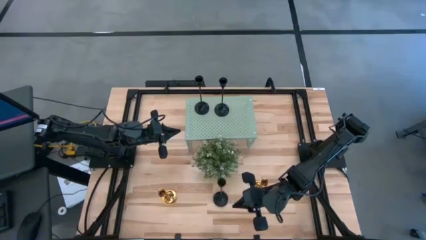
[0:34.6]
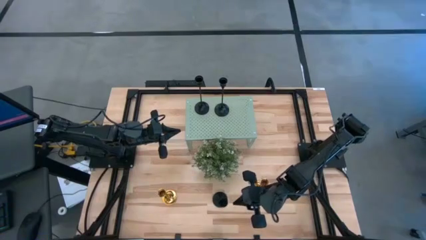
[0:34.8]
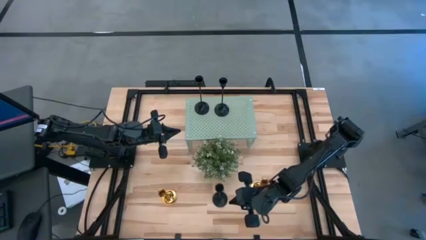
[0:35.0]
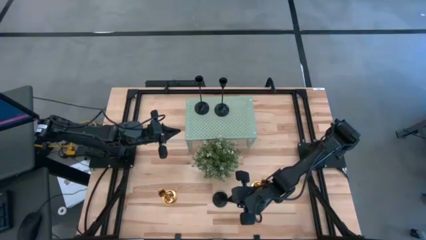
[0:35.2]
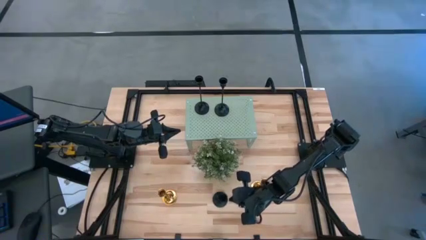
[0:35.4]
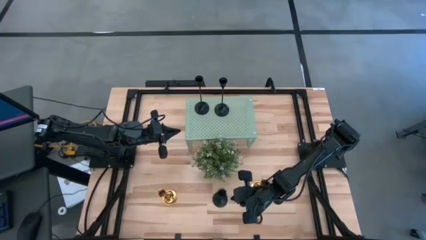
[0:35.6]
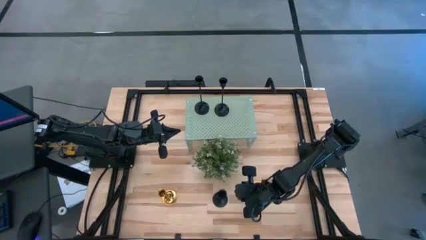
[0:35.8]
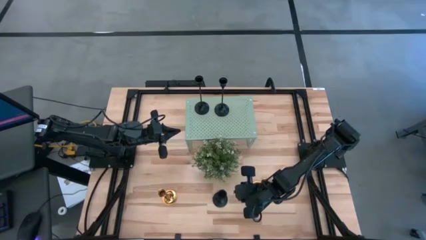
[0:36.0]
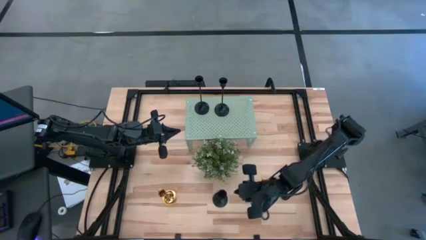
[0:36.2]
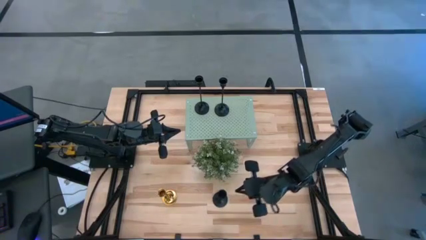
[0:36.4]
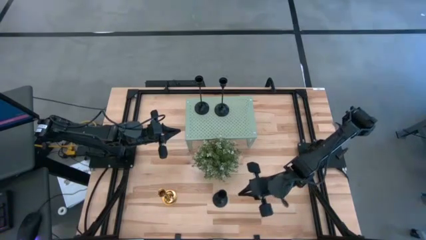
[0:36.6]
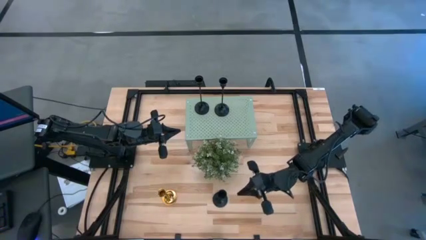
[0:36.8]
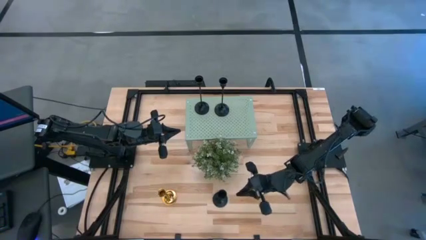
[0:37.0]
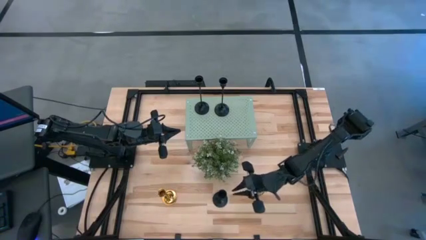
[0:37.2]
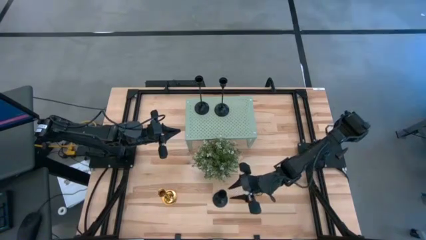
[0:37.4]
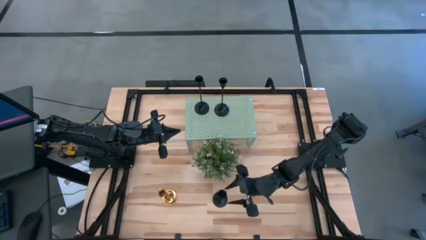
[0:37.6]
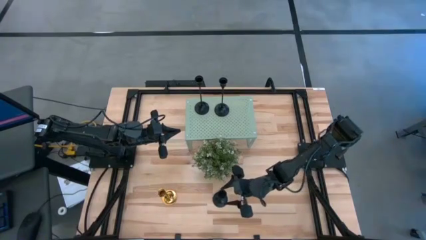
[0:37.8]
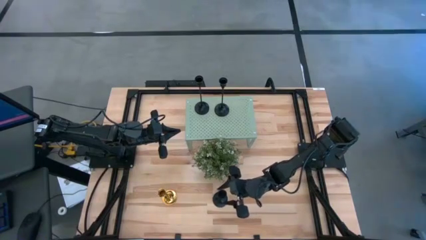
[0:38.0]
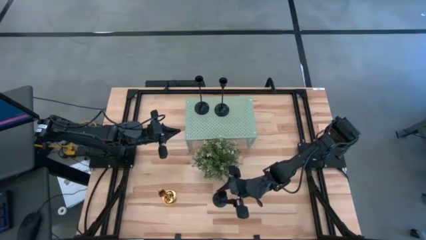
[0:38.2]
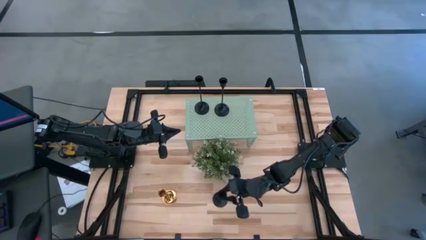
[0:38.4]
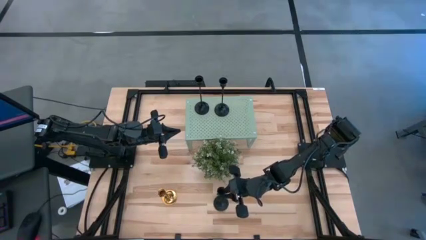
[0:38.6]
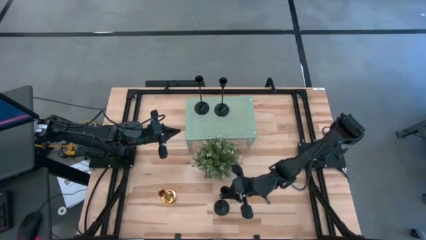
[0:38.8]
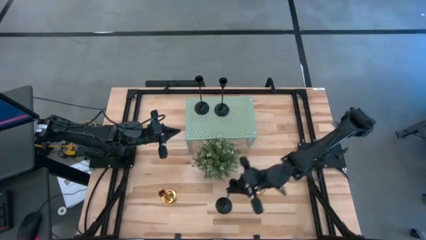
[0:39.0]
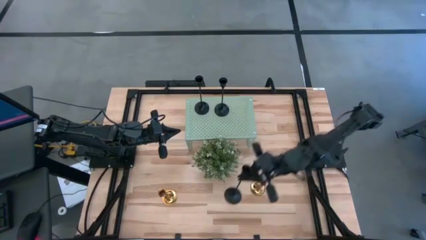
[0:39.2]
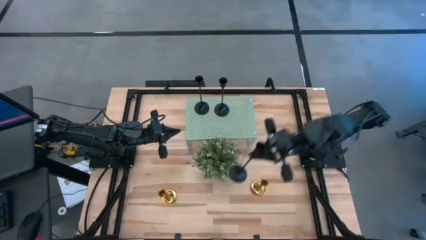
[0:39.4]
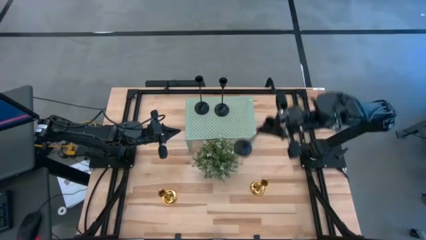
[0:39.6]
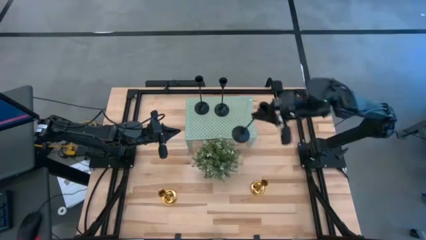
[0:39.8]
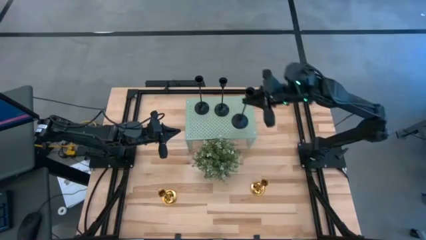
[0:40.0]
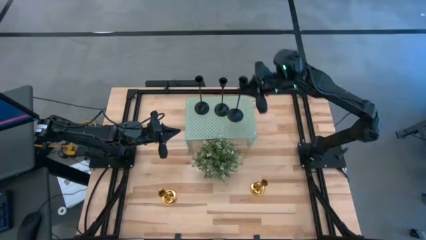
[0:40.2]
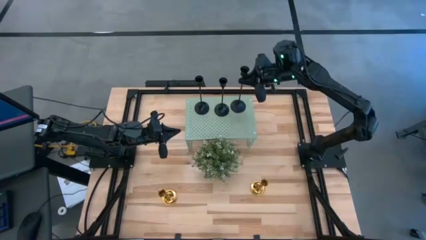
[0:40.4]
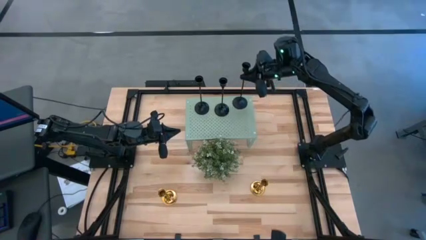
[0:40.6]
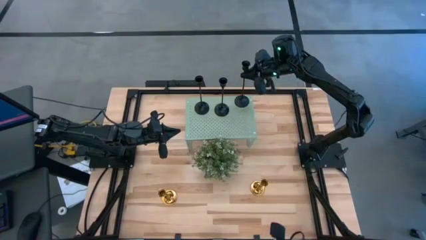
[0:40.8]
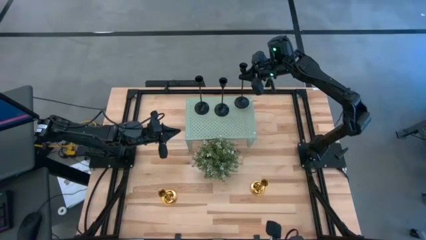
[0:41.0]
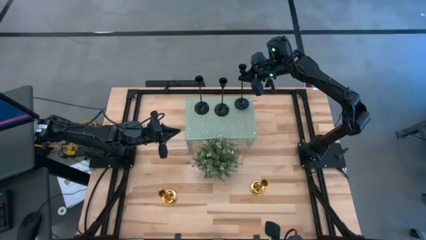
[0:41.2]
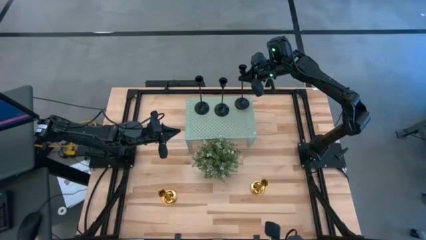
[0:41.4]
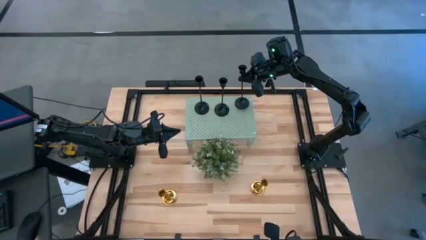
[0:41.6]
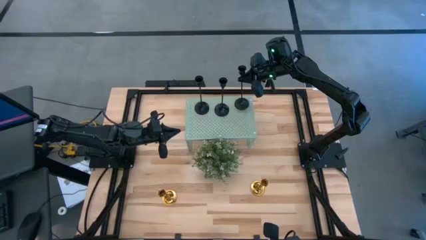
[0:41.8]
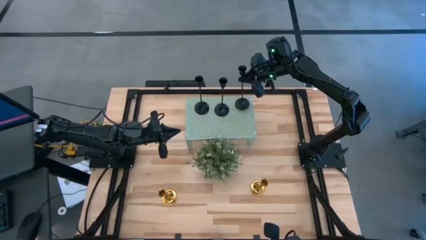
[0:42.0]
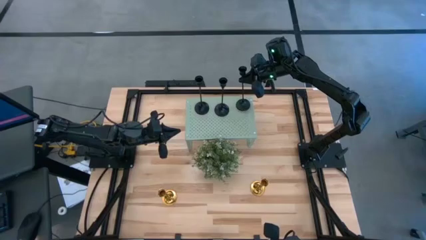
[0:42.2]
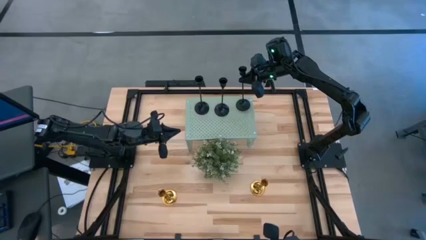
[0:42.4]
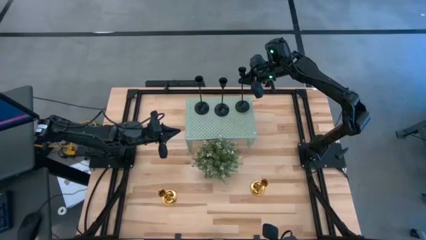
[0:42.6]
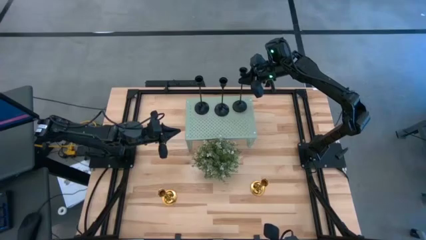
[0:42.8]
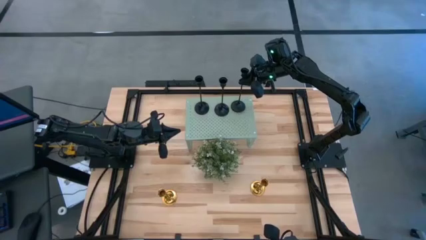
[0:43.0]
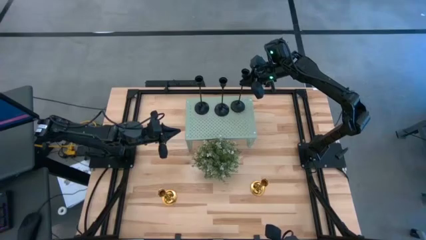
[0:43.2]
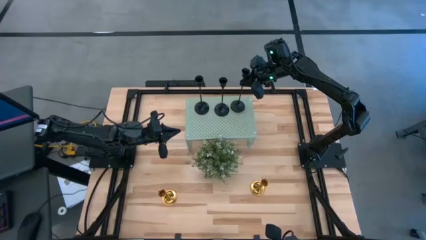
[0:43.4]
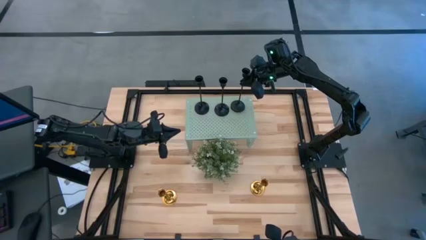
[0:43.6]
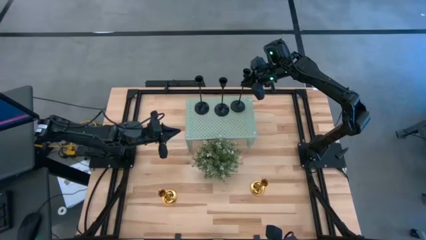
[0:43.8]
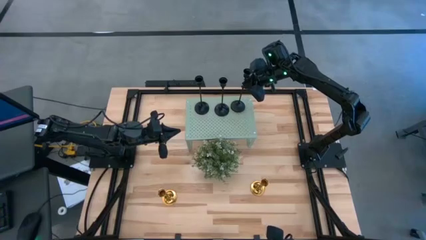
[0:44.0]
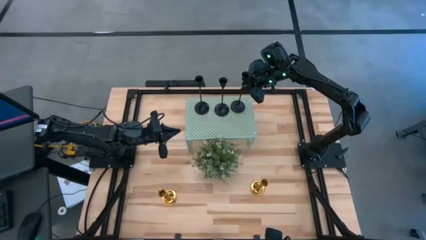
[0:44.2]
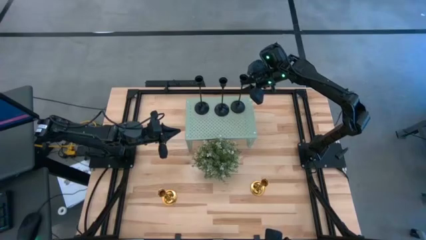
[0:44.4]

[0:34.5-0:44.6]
Task: Pick & Place candle stick holders
Put the black candle holder on the shelf

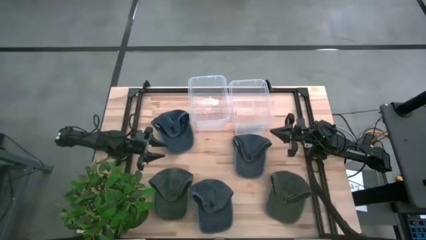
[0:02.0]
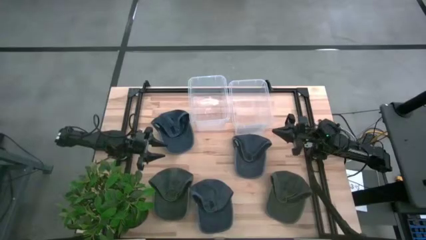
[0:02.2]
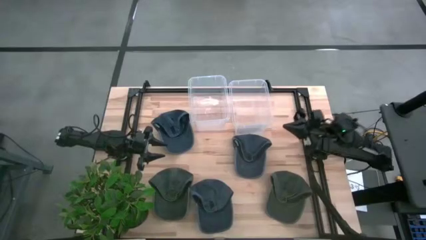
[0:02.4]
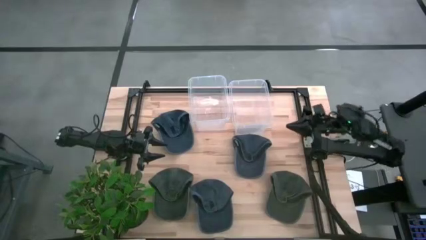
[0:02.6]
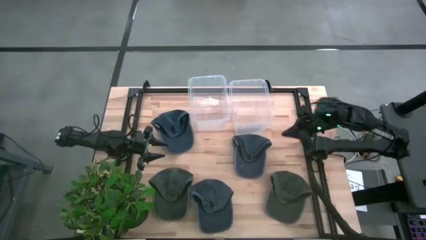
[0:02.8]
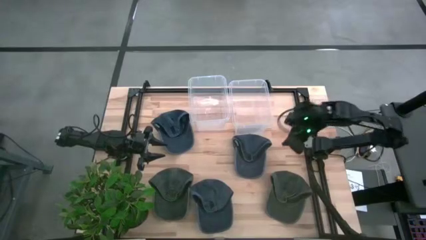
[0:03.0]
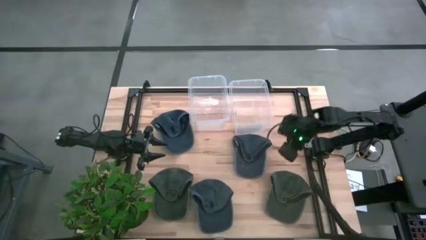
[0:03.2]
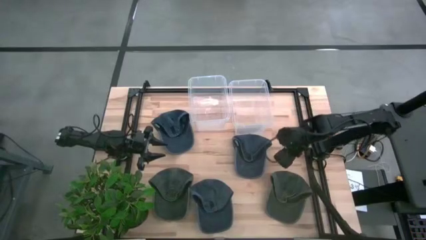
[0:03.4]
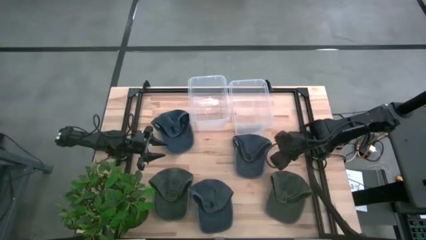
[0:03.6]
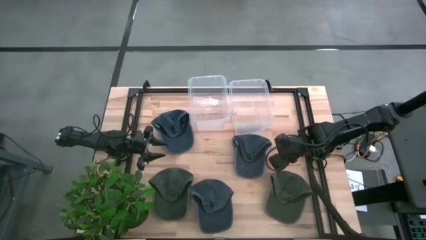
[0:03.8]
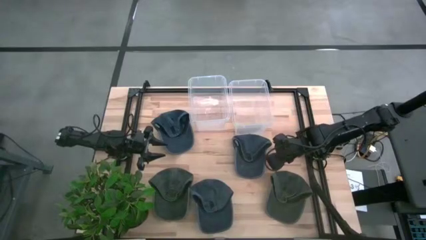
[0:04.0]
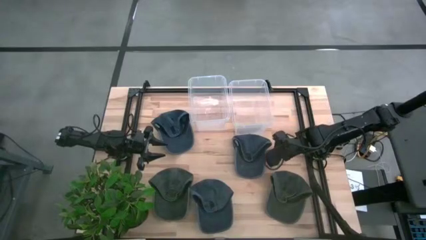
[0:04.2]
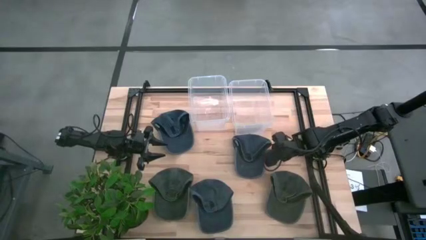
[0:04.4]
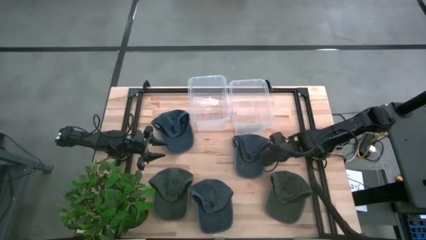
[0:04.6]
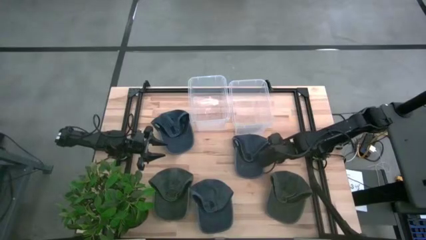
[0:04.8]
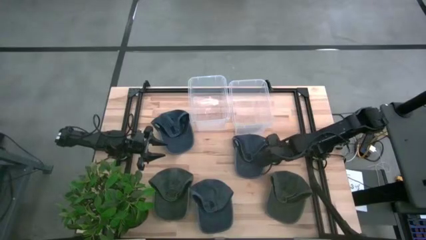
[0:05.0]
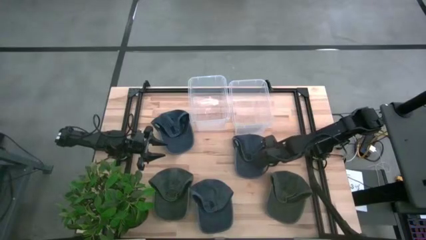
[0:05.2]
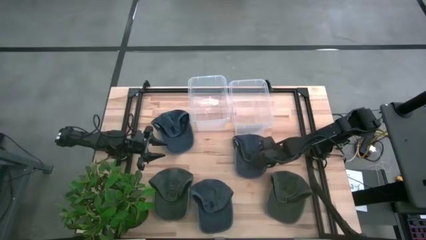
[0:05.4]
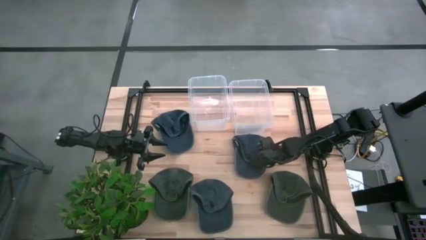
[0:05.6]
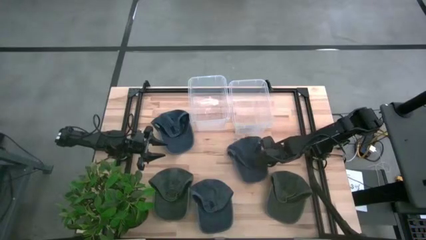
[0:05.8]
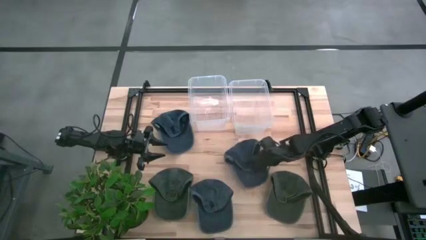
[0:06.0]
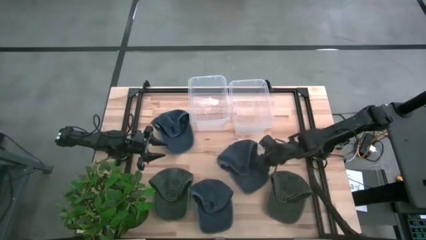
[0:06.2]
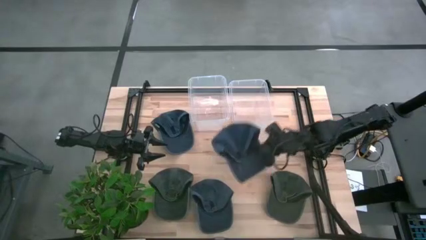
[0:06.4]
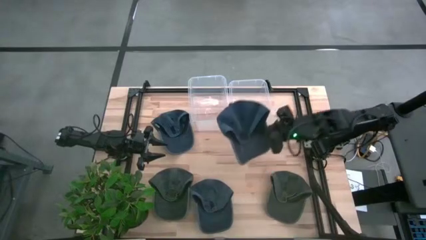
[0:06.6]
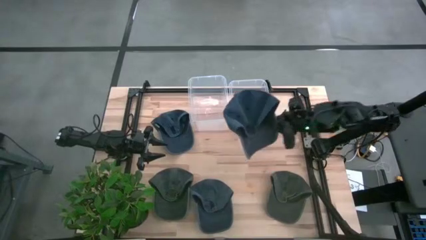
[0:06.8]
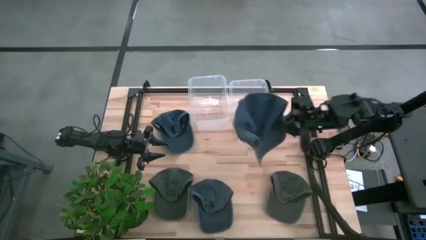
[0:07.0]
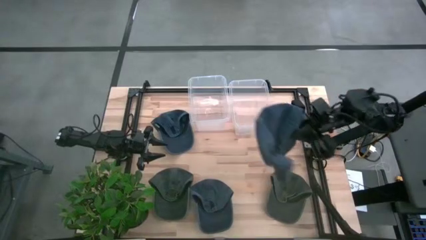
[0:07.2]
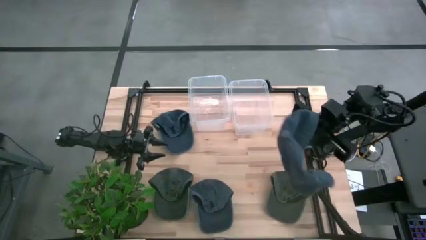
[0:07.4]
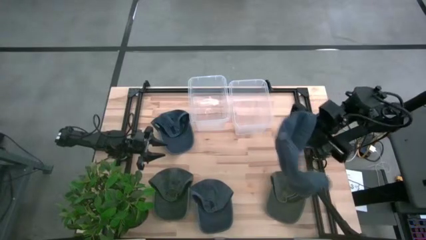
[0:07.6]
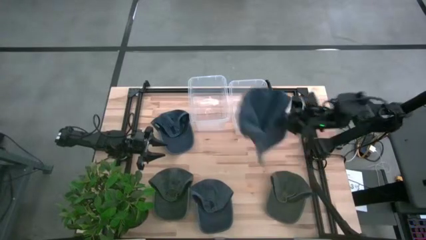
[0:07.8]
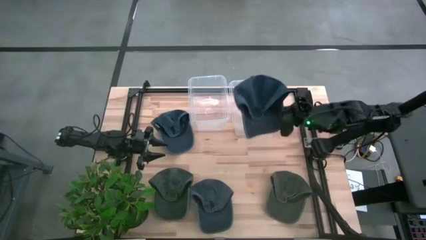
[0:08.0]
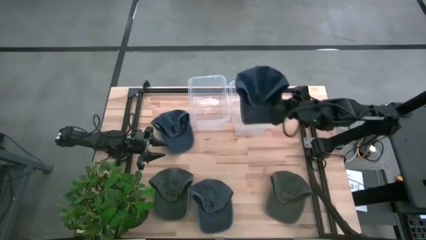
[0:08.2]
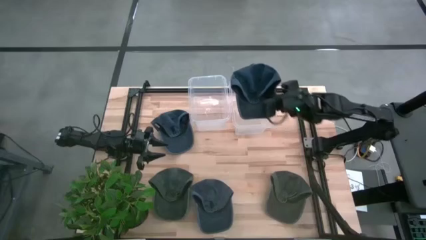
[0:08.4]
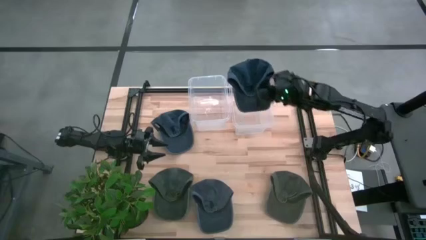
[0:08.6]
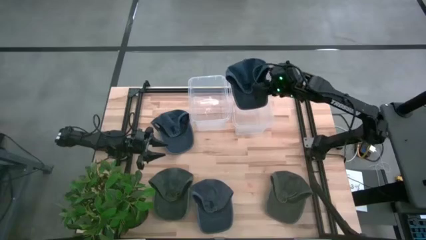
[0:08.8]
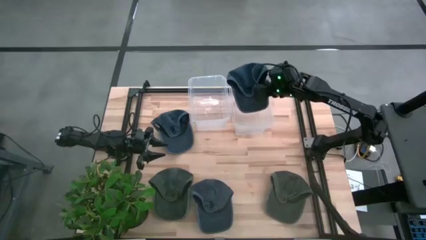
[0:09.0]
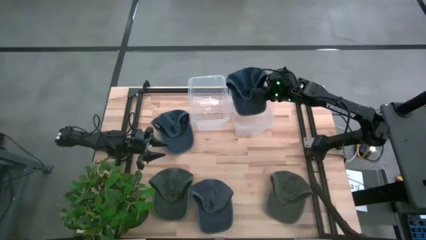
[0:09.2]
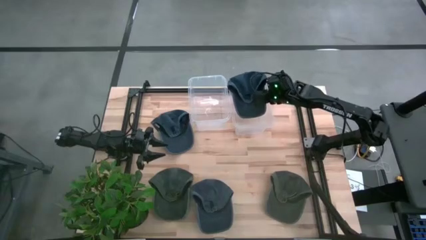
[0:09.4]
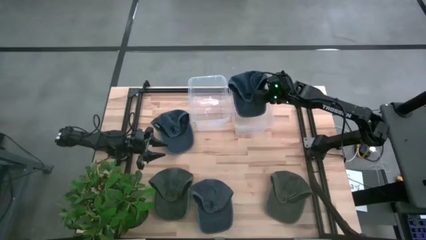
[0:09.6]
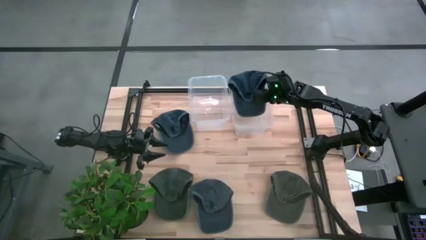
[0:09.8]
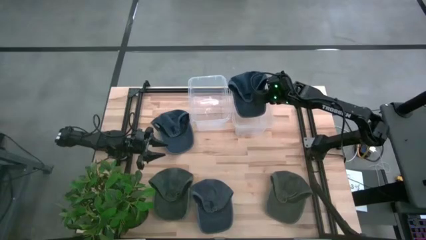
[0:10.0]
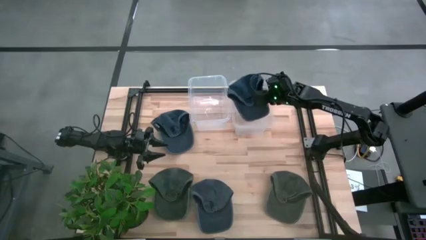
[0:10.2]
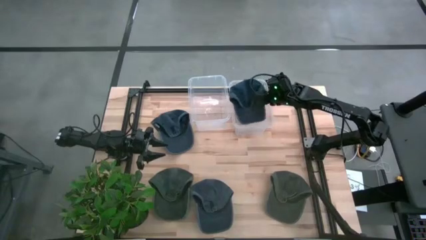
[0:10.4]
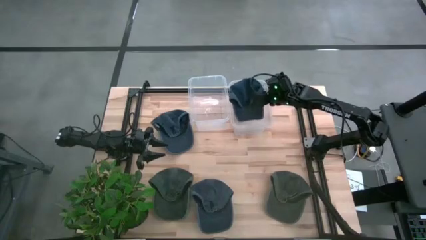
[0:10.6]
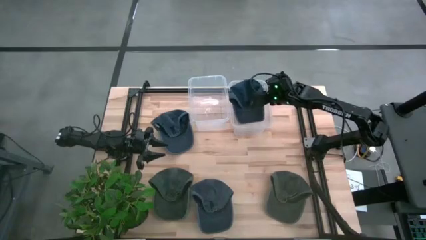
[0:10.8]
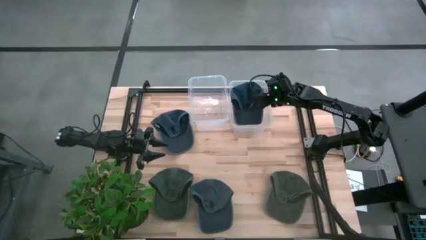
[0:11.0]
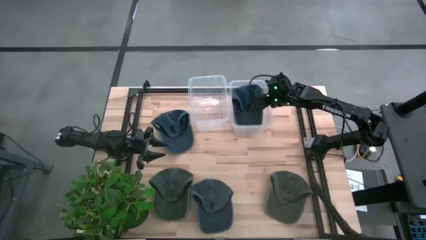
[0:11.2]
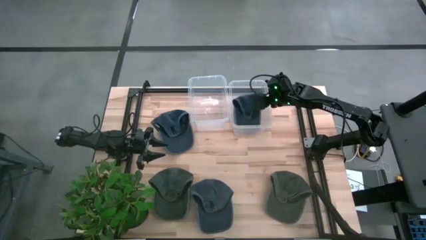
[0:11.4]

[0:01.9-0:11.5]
Task: Pick & Place hat
Put the middle right blue cap into the right transparent bin
